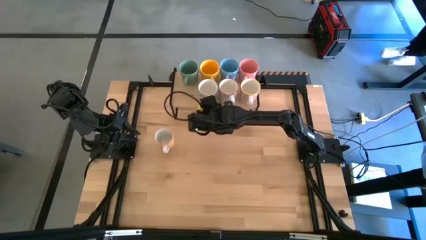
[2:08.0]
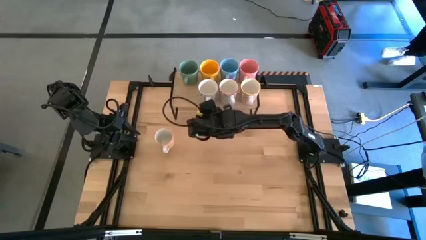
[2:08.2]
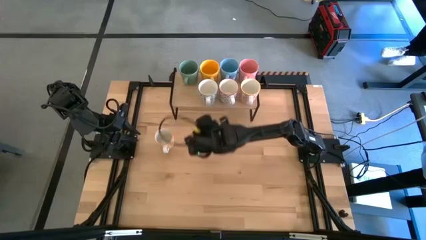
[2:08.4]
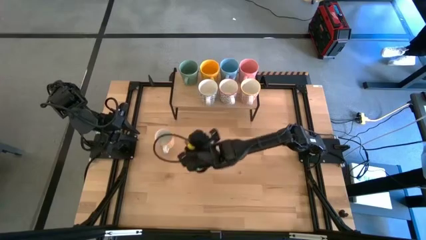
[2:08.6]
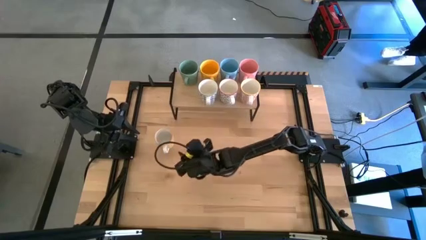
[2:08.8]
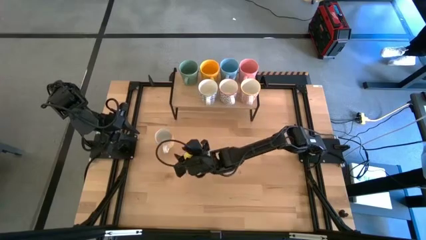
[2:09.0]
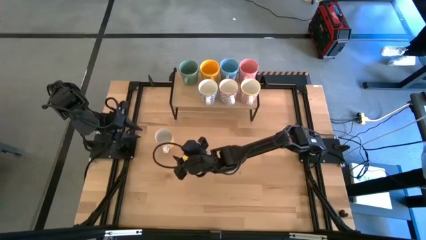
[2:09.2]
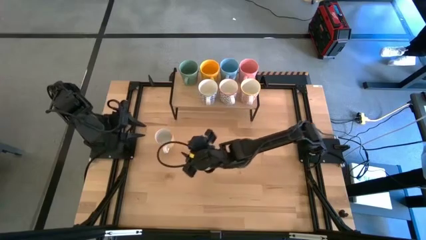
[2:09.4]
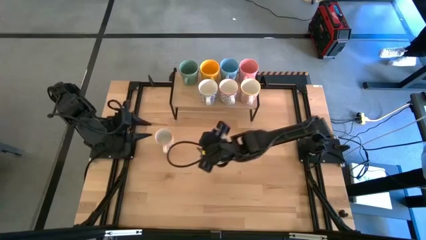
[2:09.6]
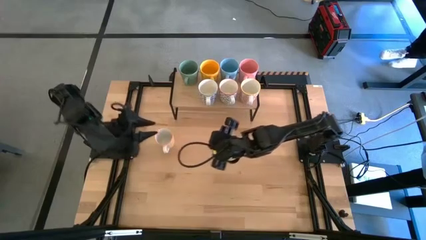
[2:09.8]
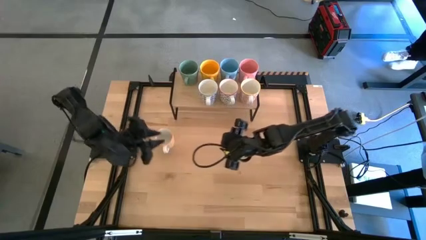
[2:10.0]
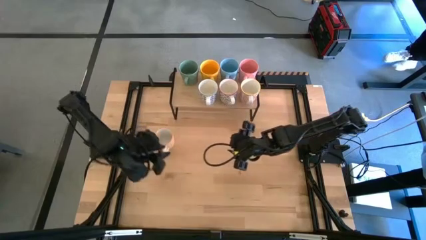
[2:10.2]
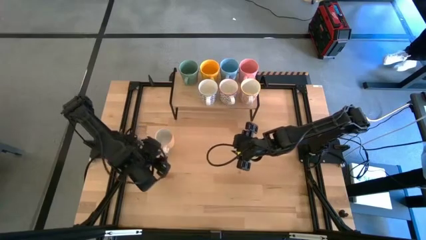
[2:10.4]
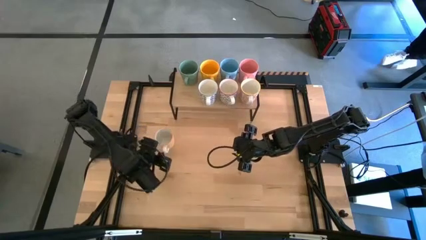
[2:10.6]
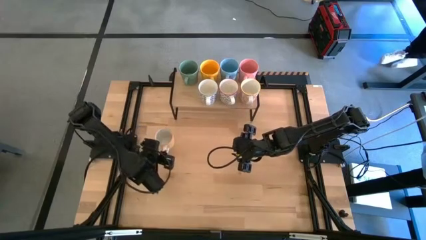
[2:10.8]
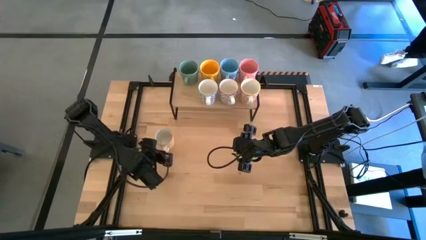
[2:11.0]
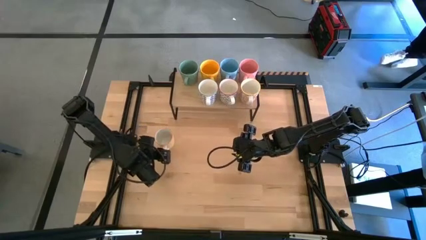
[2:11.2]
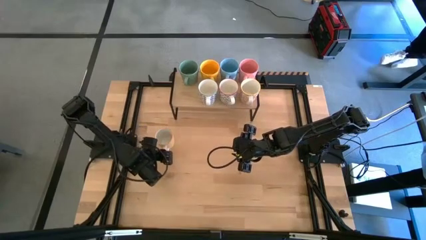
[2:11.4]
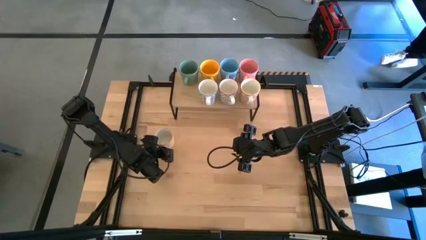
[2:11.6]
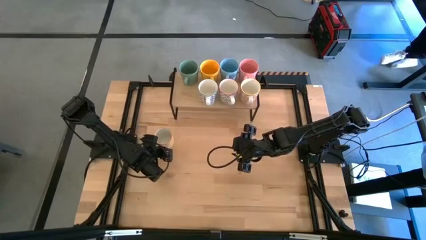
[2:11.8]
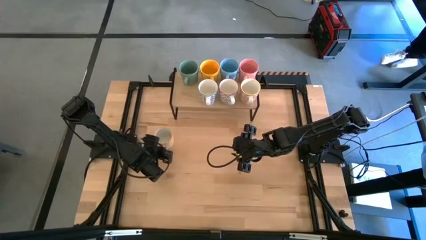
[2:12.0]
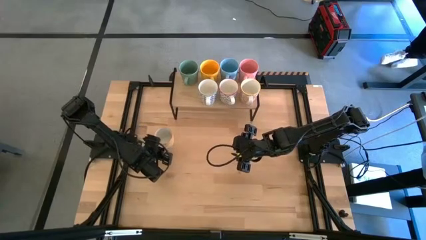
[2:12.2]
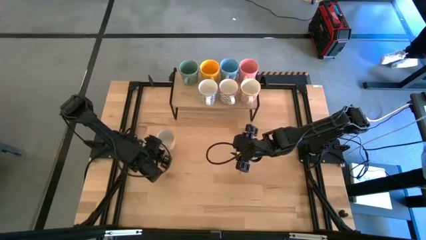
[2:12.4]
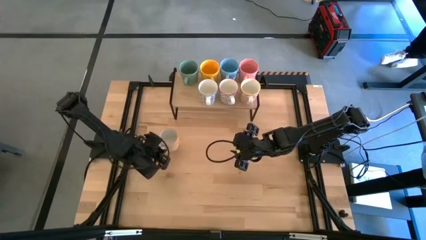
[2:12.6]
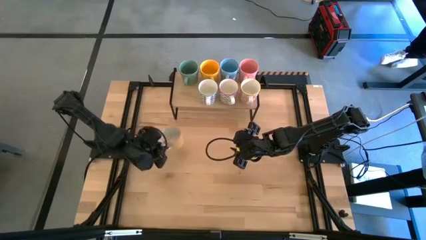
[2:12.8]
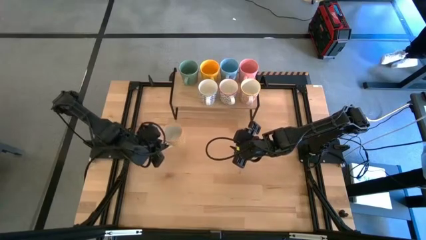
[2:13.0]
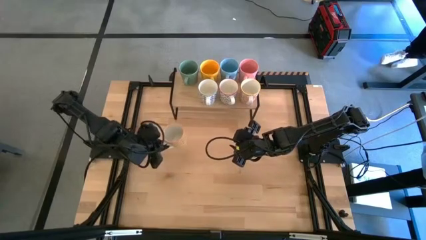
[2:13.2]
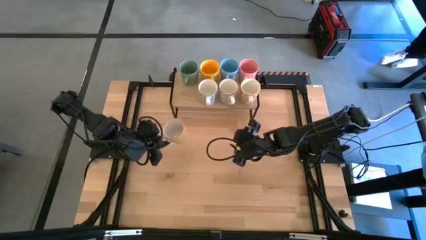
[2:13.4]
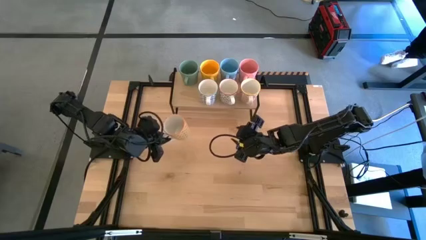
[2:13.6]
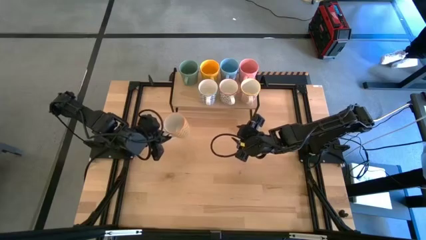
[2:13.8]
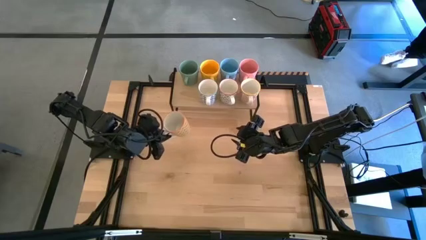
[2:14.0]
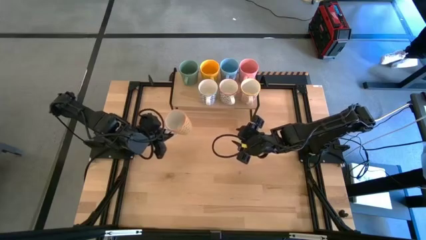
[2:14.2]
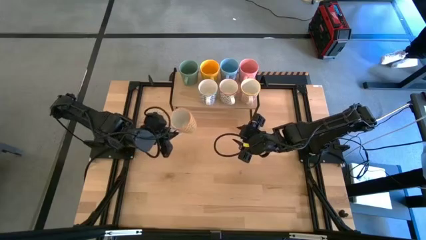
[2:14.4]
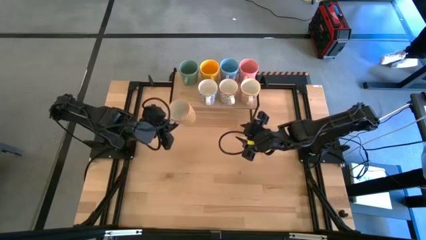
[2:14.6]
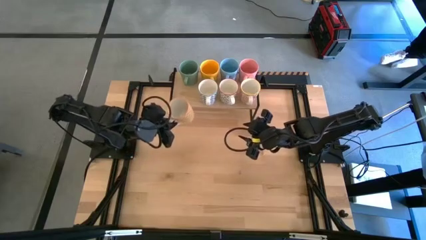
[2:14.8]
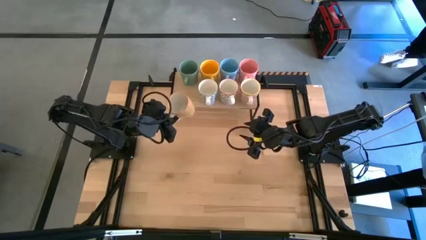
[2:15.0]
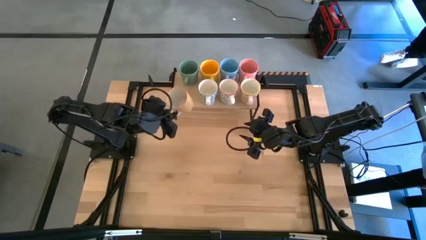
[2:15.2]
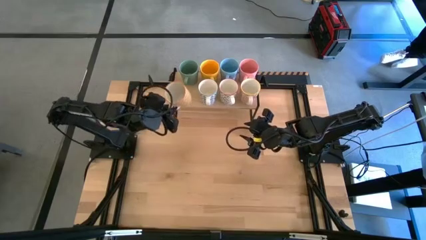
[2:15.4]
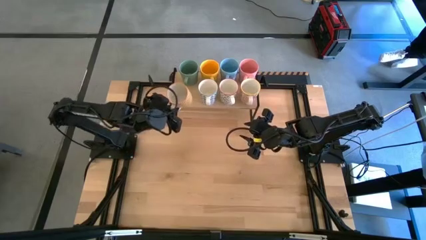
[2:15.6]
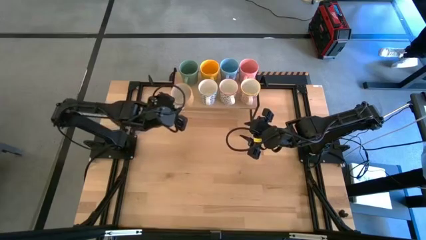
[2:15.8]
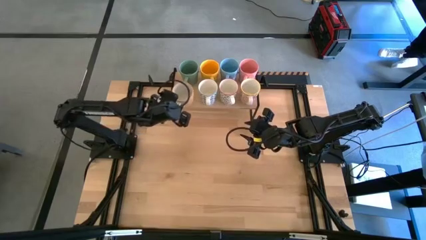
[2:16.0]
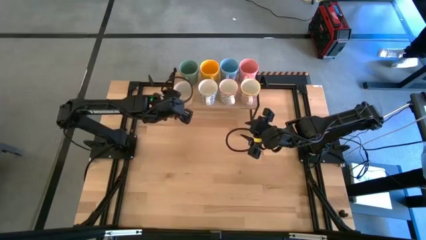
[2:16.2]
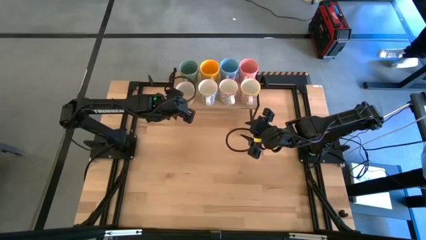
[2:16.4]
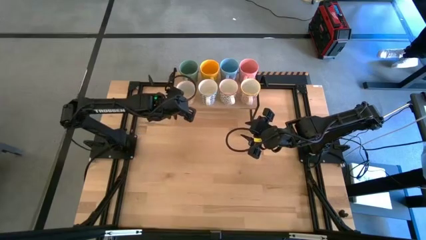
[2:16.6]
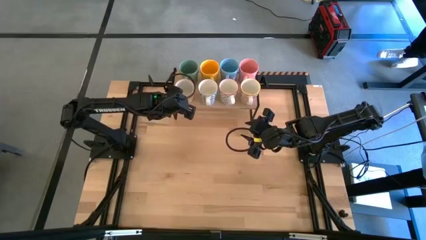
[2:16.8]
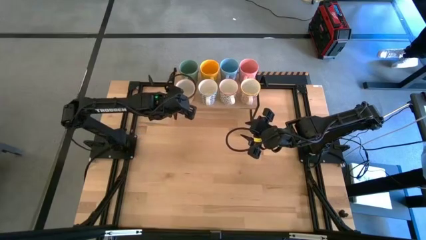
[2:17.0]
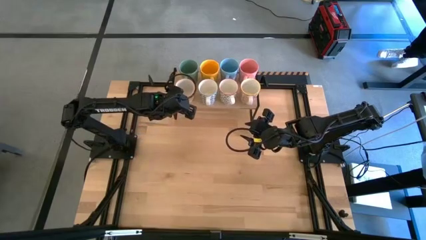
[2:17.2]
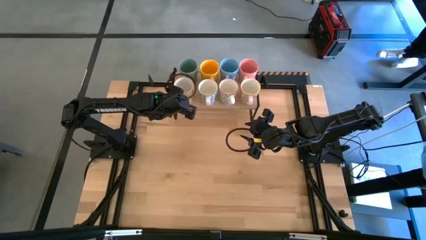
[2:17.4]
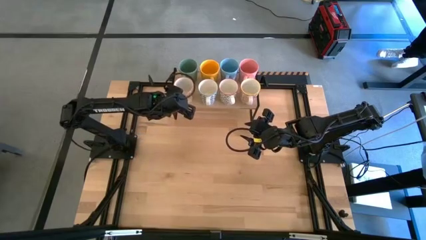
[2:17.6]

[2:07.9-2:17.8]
Task: Place coffee mugs
Put the yellow patterned mug on the shelf

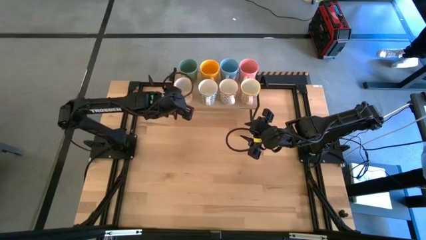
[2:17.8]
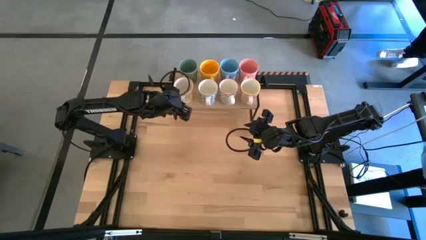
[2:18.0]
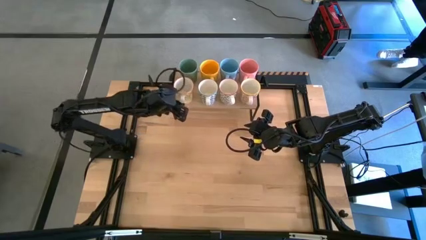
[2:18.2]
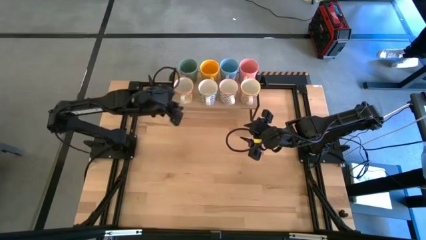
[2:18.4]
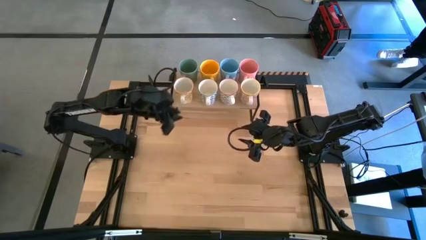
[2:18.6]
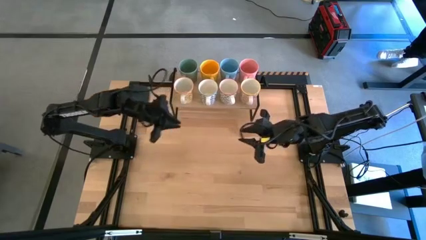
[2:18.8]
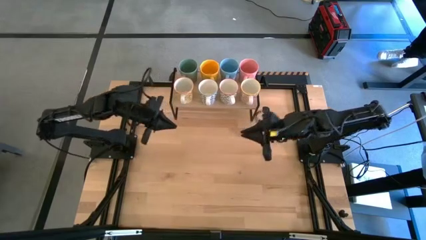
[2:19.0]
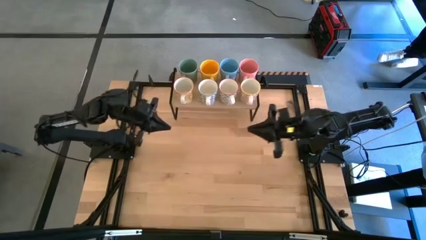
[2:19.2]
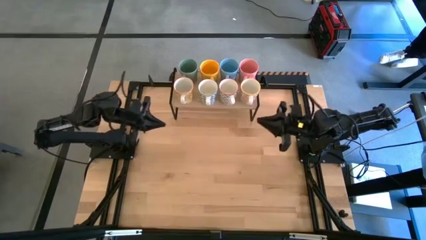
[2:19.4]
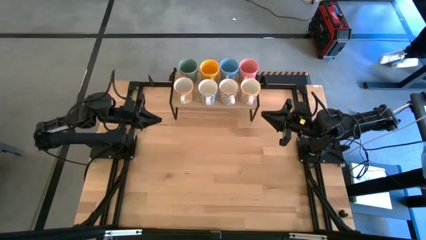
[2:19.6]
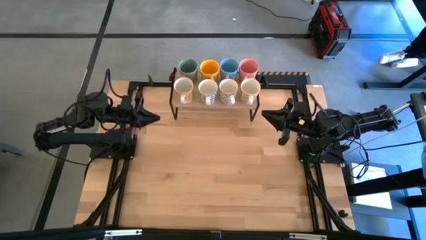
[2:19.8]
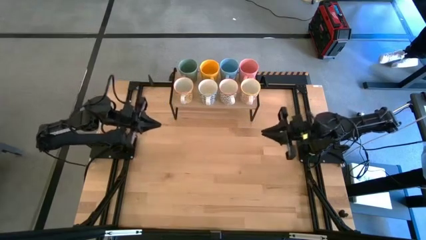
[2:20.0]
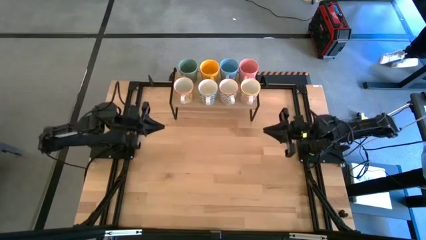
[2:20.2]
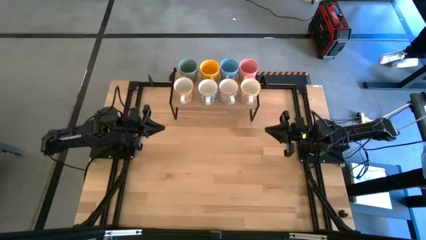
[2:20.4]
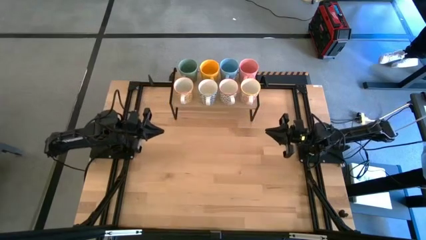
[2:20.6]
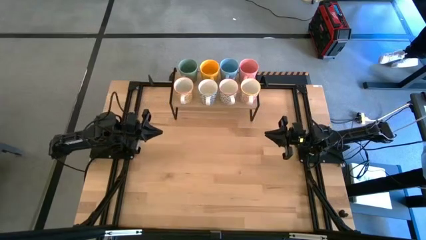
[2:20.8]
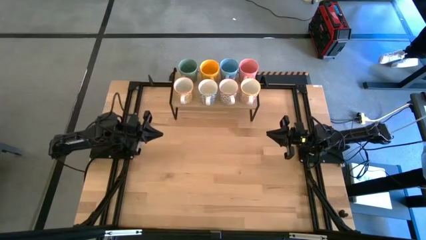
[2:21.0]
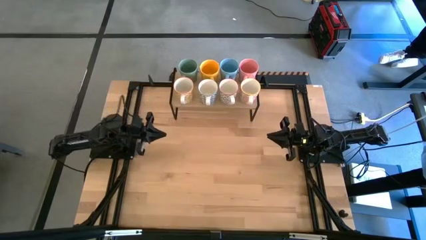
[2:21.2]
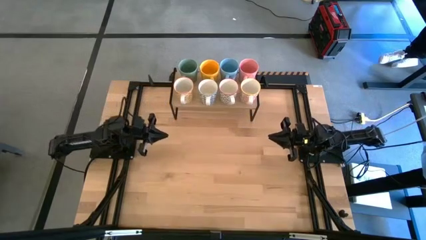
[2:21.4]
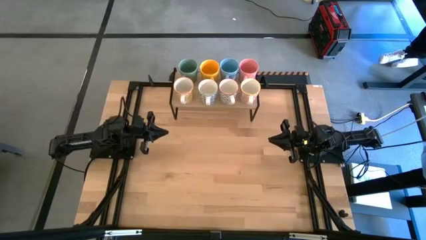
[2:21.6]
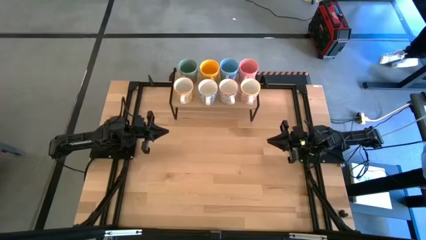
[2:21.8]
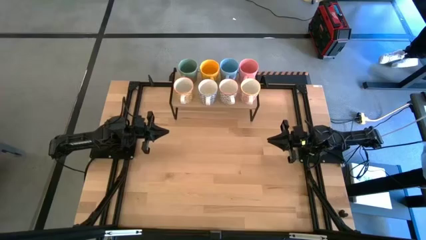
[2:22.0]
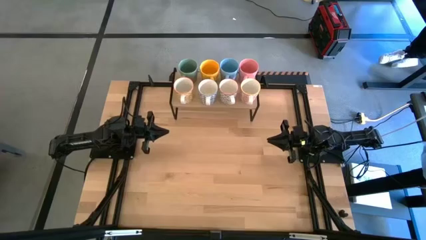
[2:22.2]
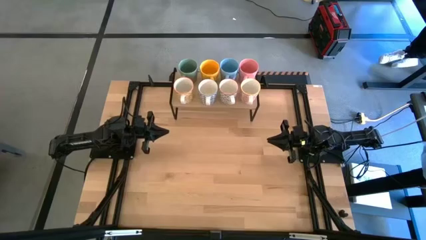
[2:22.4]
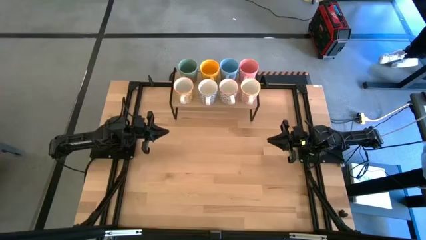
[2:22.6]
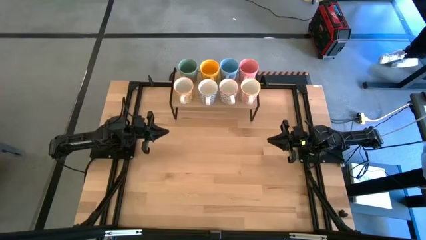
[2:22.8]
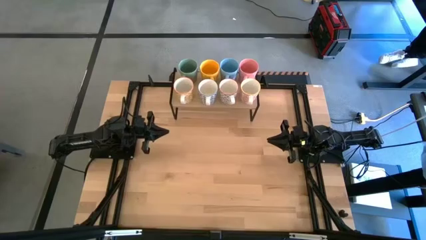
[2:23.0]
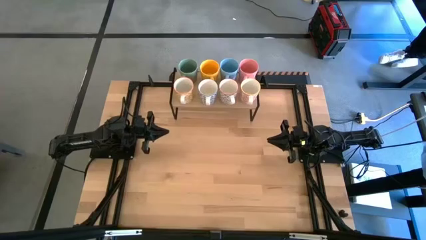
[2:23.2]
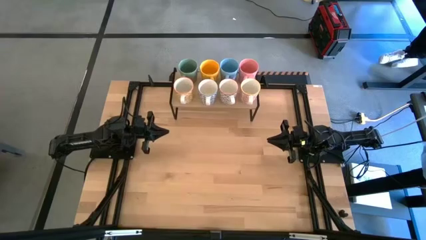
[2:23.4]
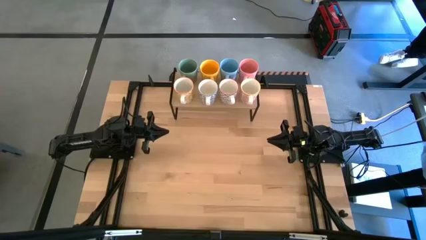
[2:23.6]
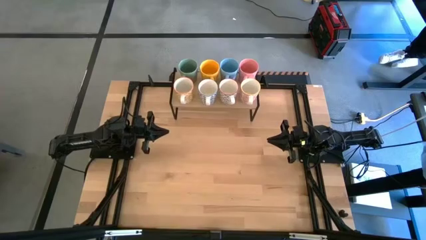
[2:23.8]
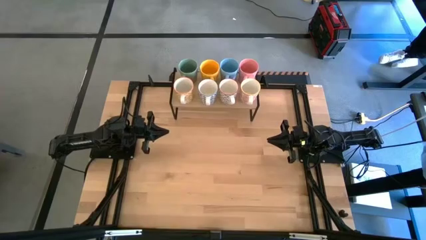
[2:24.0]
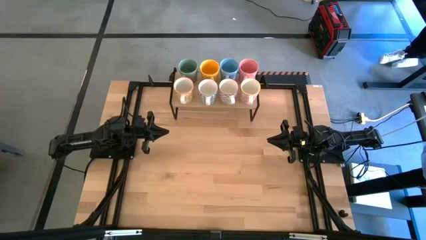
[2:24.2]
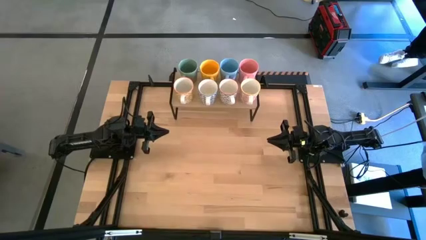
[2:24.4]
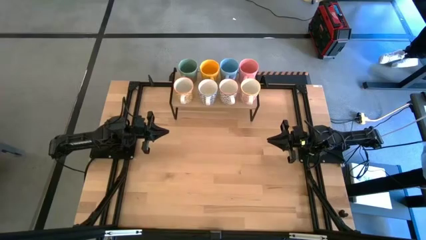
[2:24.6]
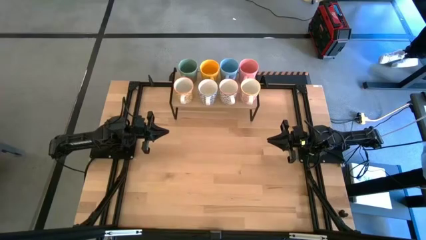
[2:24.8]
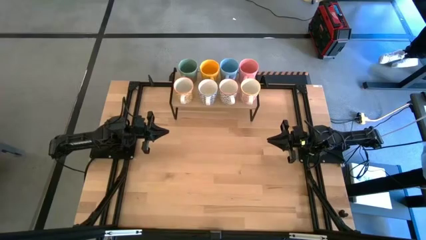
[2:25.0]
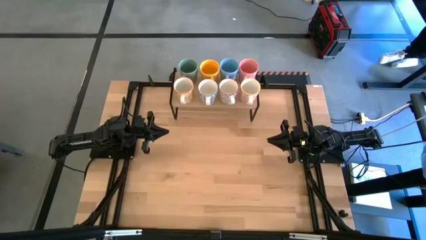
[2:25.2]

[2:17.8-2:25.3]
Return to Home Position
